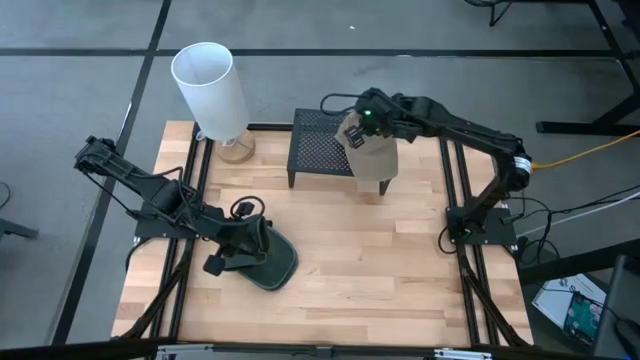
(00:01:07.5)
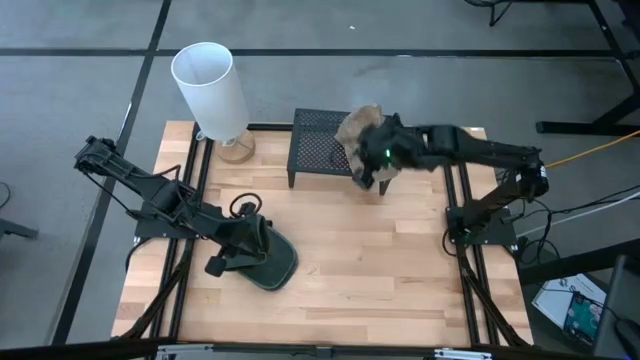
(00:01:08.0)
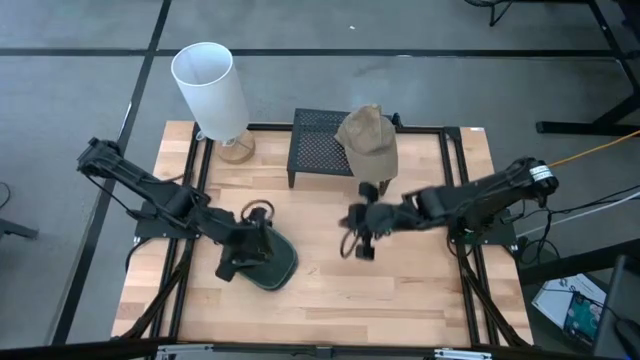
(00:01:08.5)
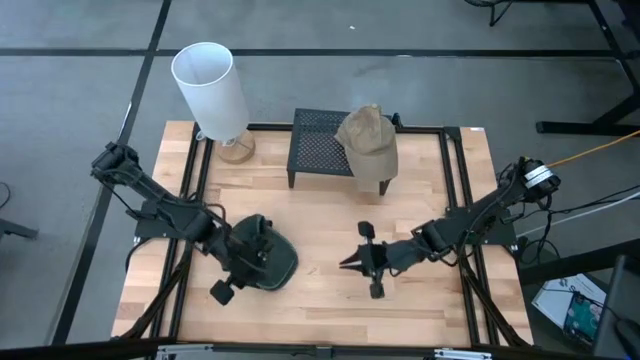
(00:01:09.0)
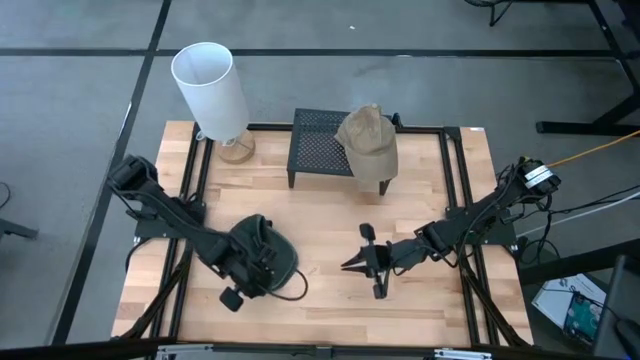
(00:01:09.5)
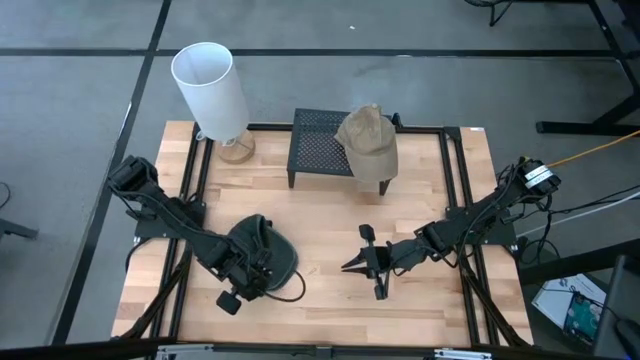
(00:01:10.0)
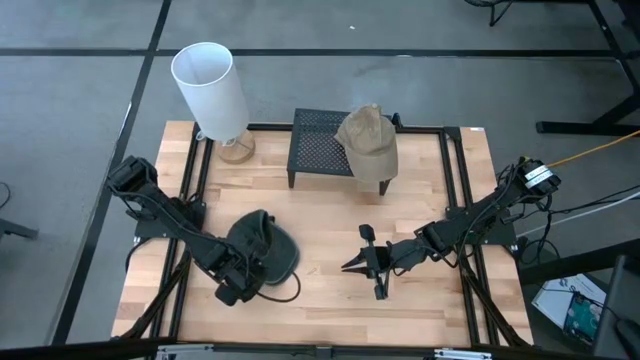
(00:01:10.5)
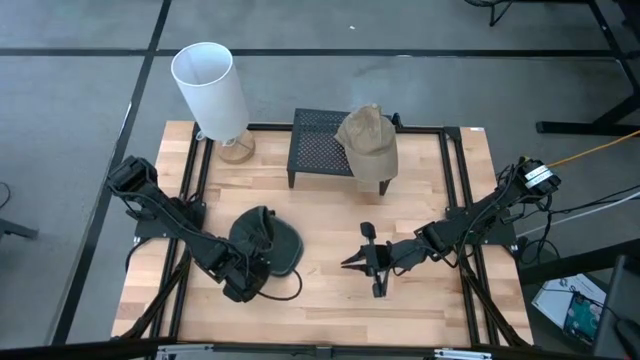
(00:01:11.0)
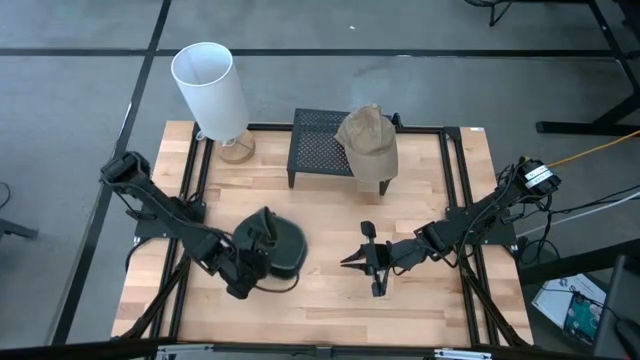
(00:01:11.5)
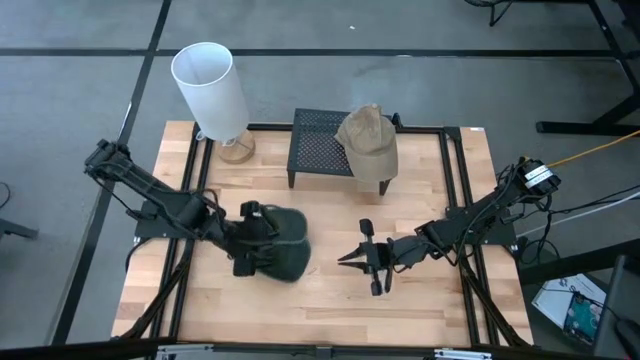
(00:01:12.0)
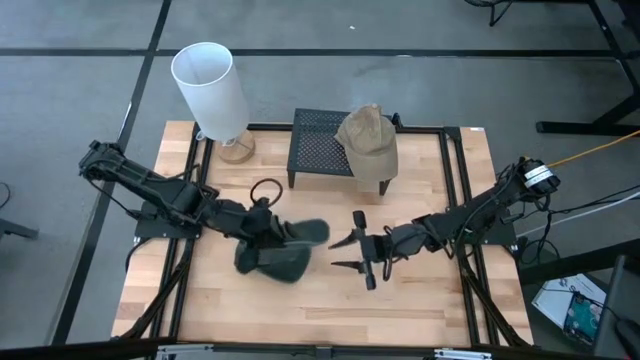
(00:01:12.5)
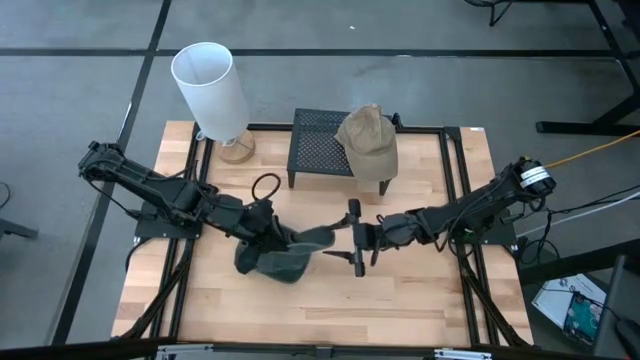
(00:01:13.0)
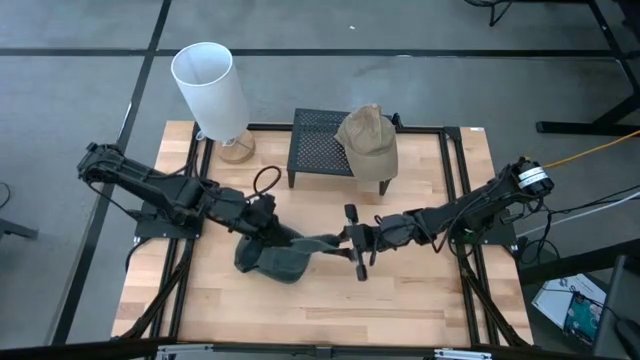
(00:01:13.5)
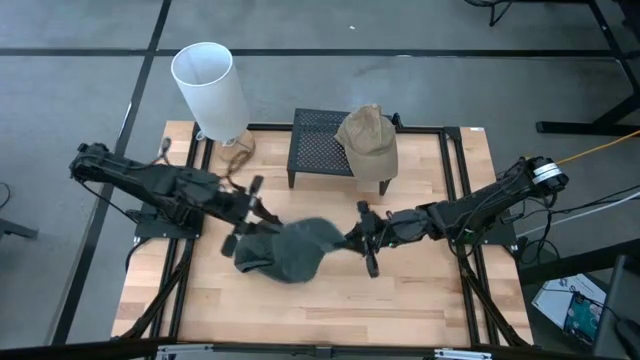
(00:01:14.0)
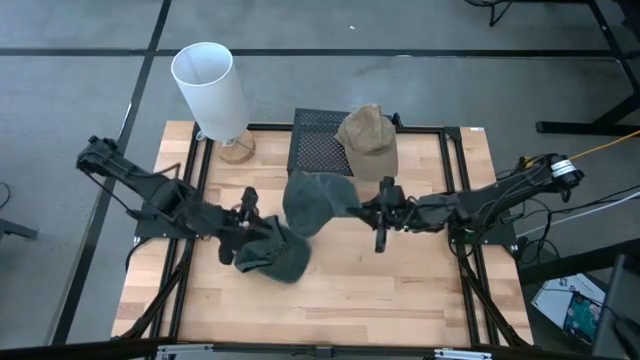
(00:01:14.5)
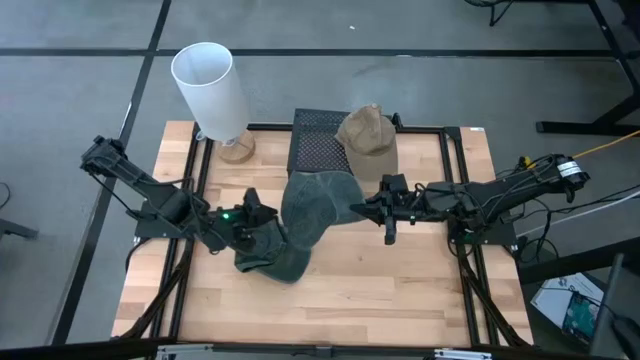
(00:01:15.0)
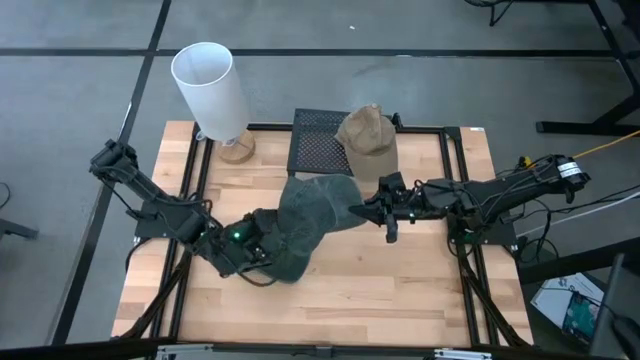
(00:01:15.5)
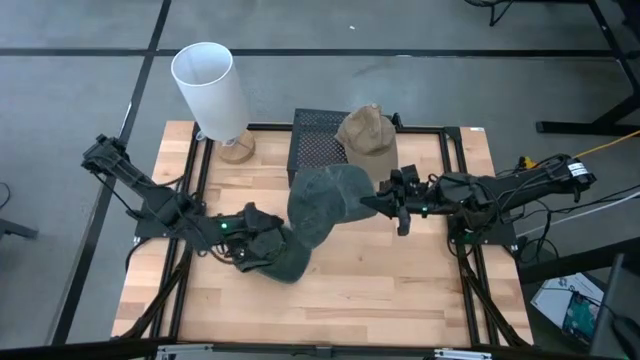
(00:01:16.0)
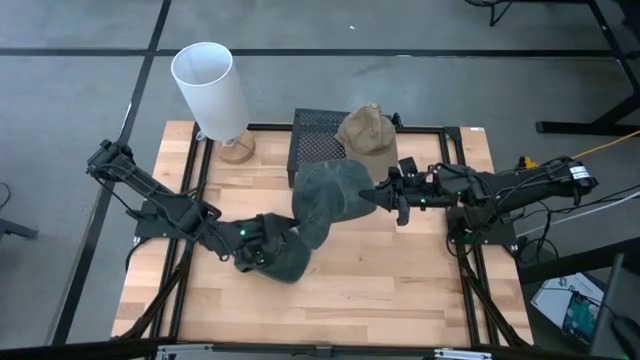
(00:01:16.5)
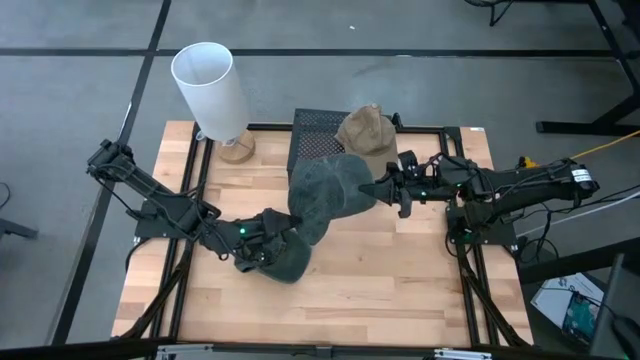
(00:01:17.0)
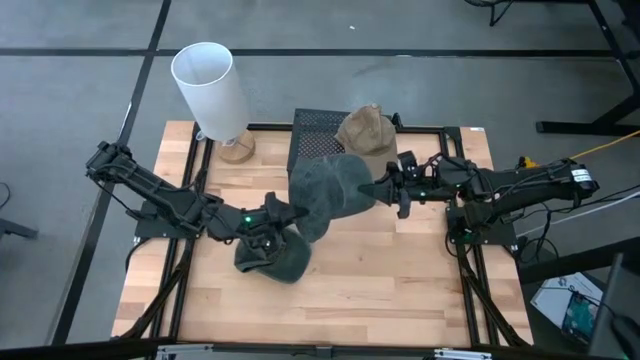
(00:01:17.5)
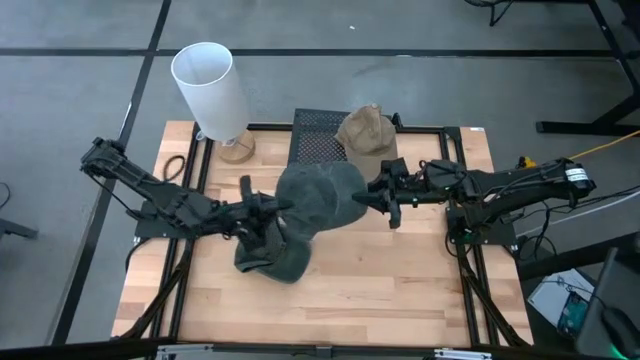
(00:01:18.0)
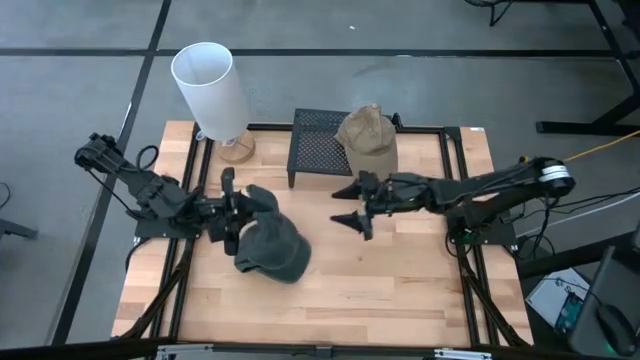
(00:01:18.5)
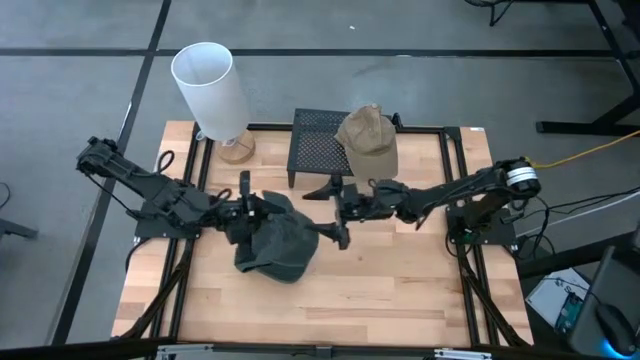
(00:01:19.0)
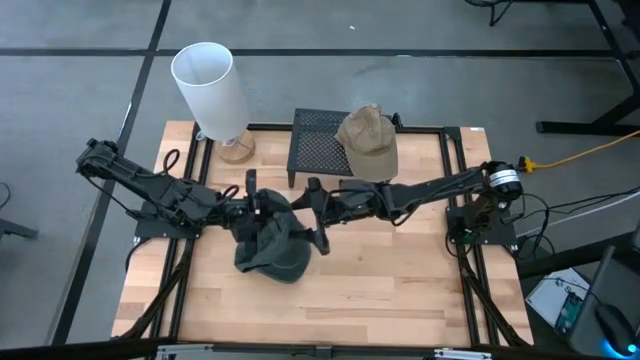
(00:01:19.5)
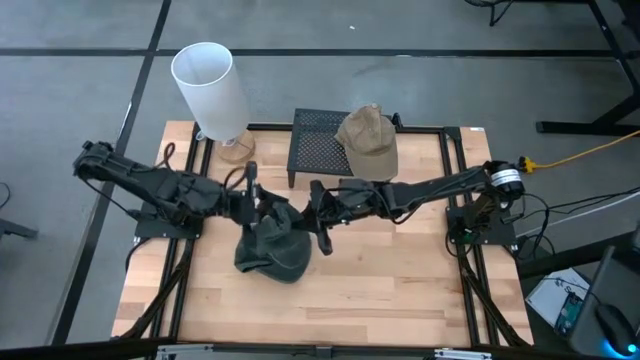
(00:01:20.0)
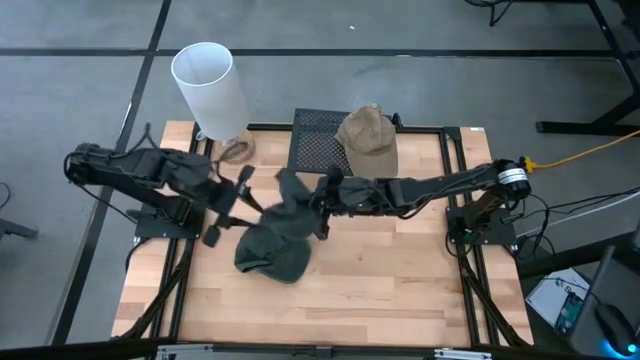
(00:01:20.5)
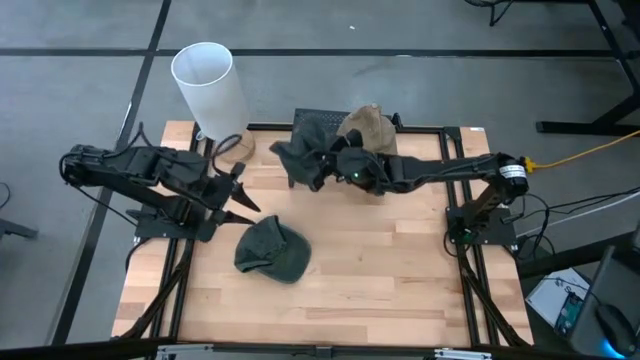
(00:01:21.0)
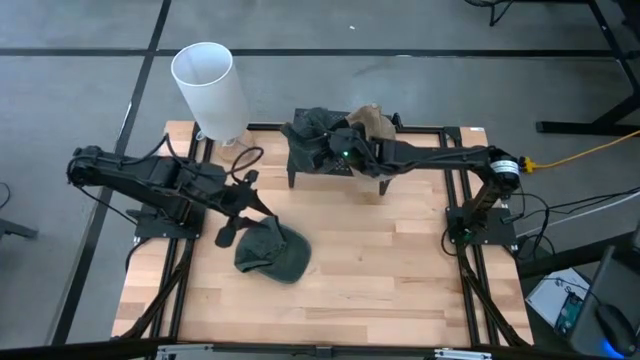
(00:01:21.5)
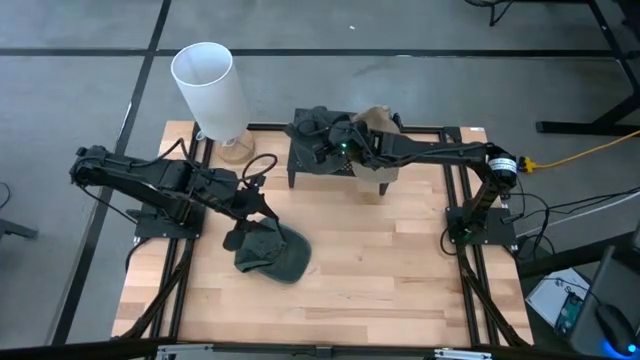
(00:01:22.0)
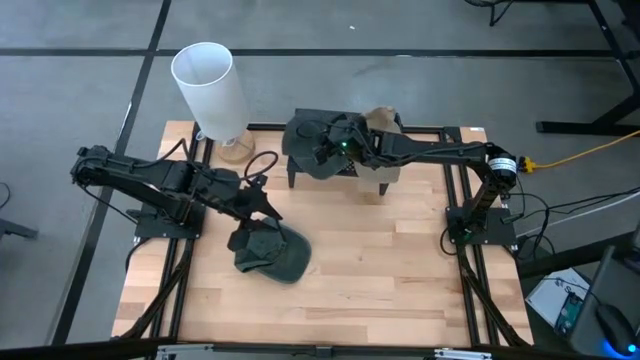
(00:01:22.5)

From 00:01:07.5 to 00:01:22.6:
Task: Pick & Place hat
Put the top black cap on the shelf
